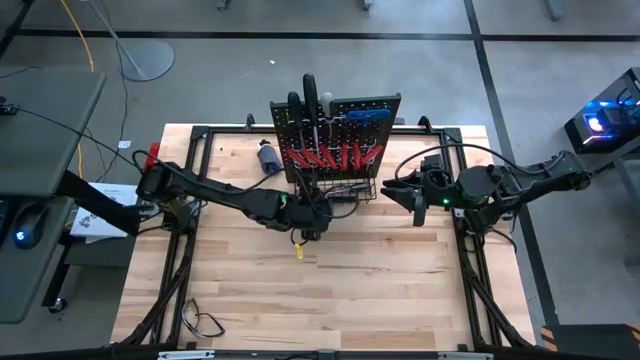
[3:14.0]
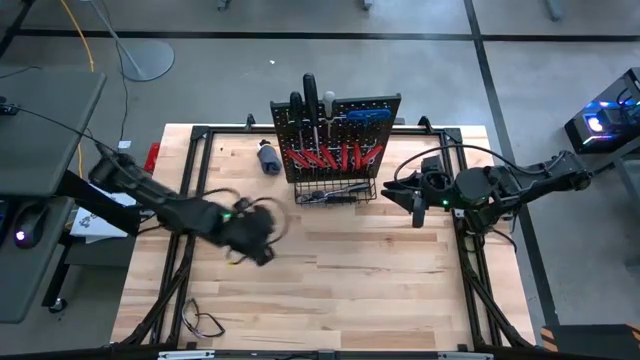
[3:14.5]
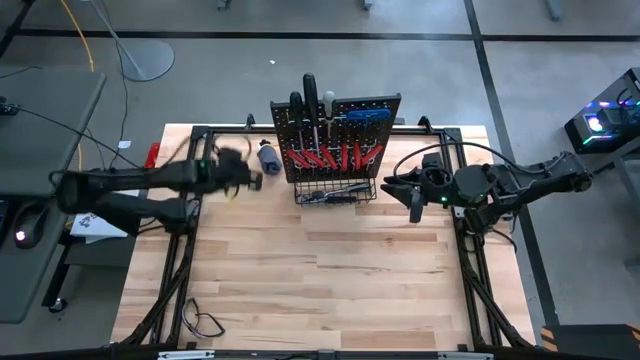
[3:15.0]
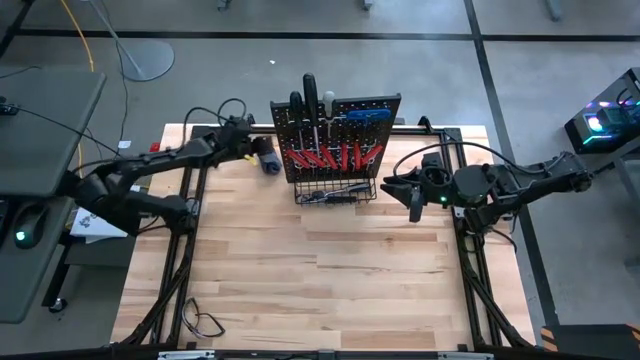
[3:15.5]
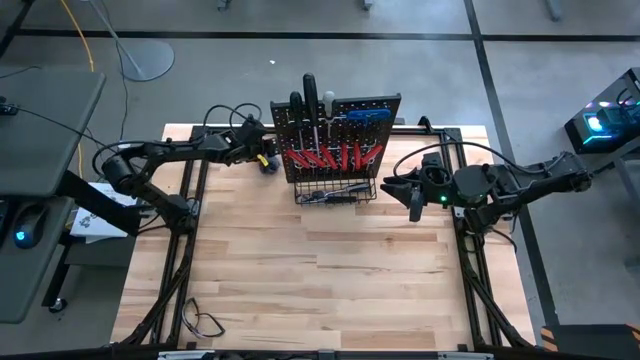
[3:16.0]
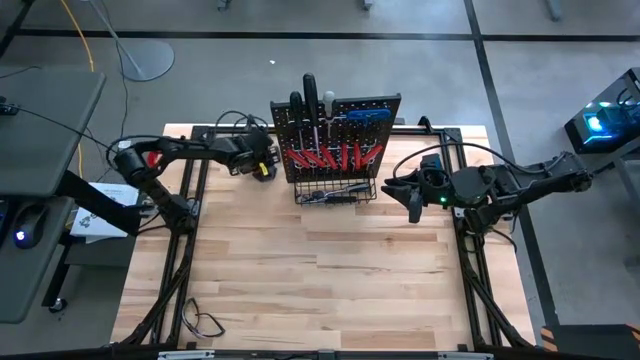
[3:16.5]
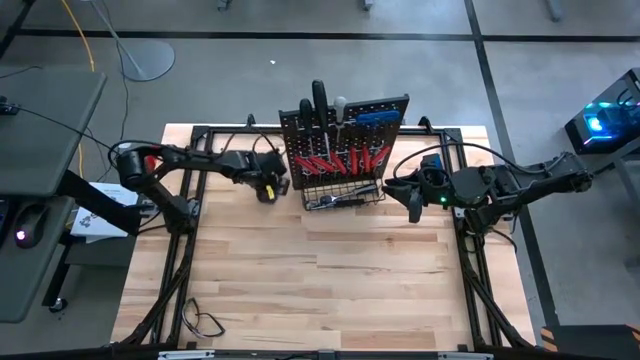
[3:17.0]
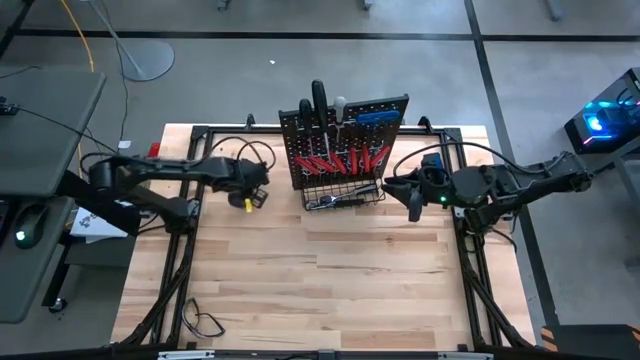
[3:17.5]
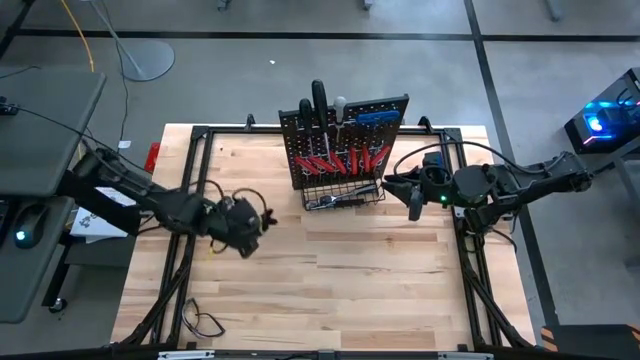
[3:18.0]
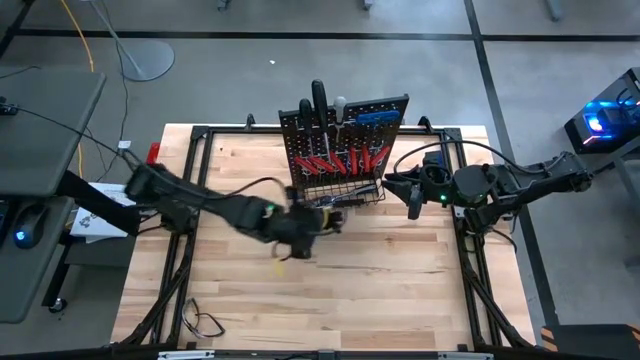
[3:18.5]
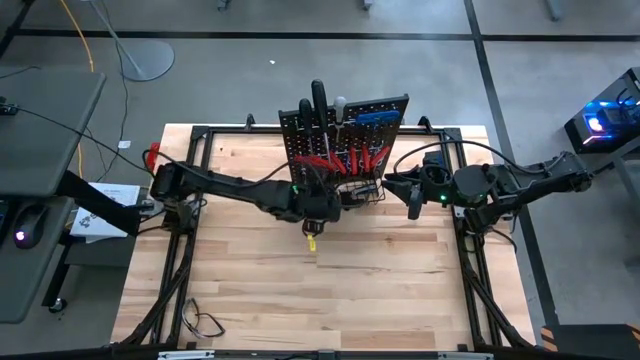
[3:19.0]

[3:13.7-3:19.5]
Task: Hang tools onto peg board
Put the gray tool loops into the wire basket on the peg board

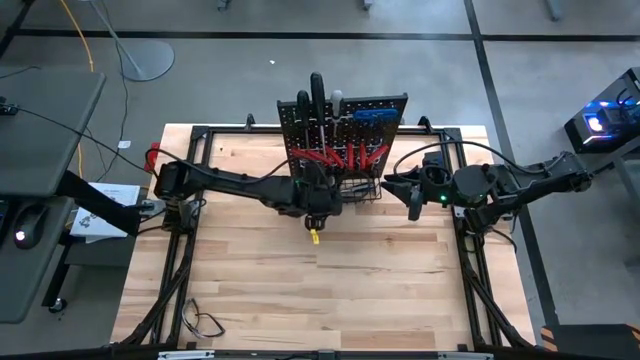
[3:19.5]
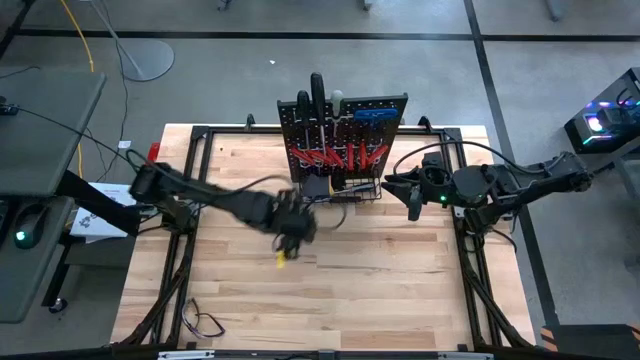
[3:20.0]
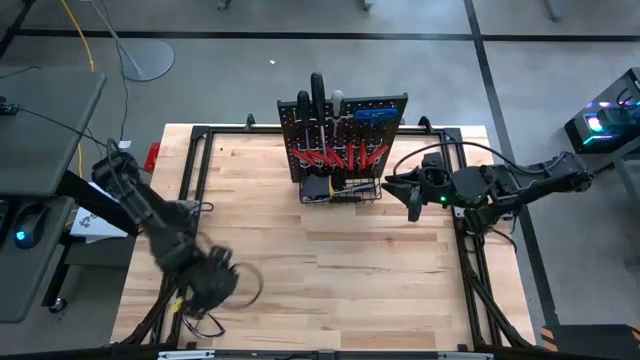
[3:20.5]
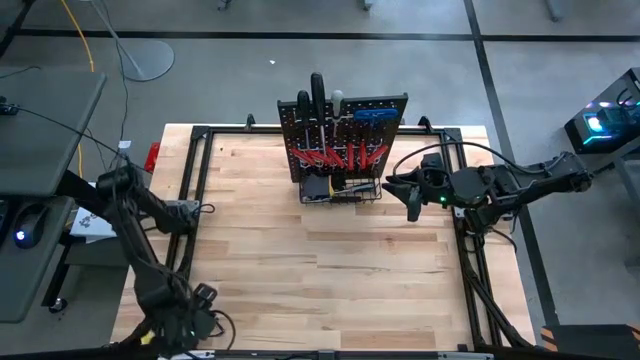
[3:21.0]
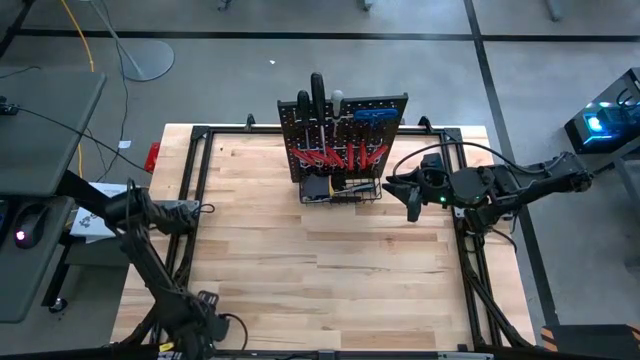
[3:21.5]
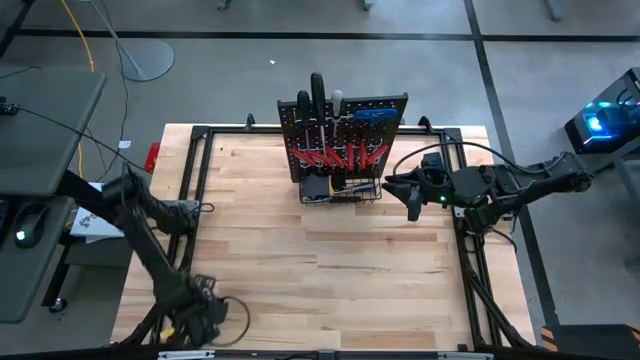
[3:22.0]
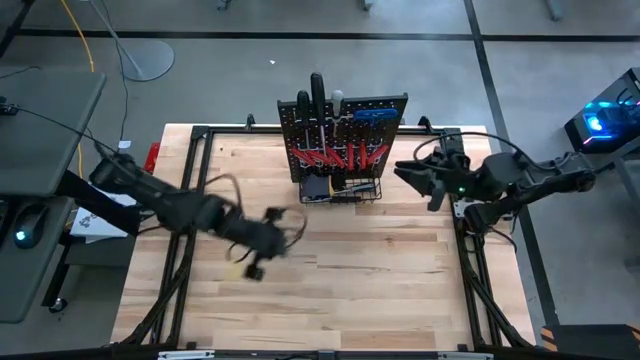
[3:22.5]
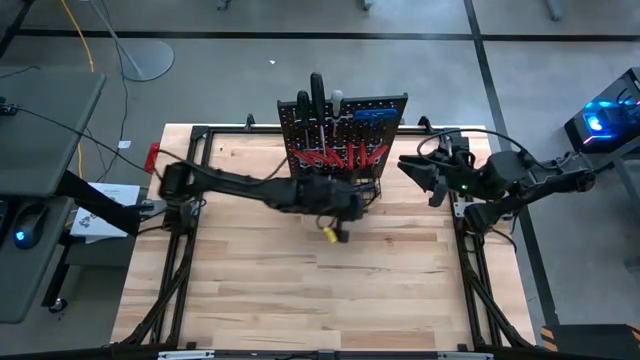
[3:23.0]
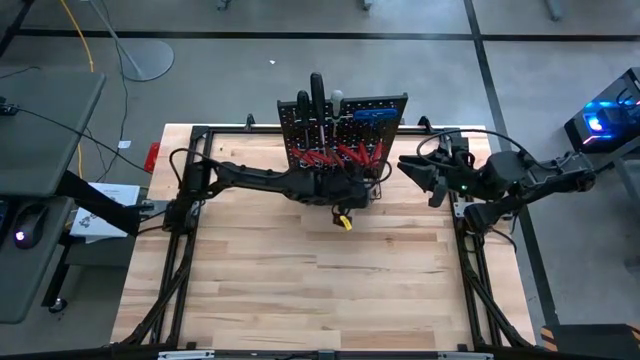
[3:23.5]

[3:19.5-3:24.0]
Put the transparent safety glass into the wire basket on the peg board

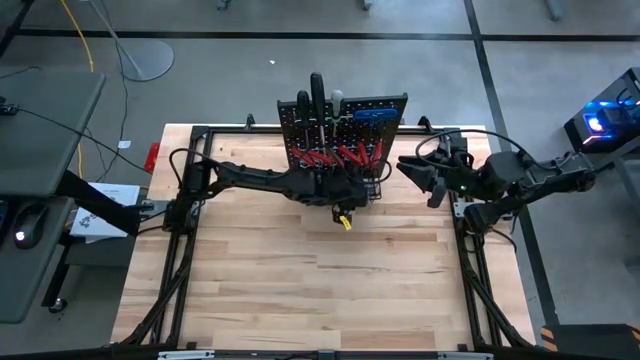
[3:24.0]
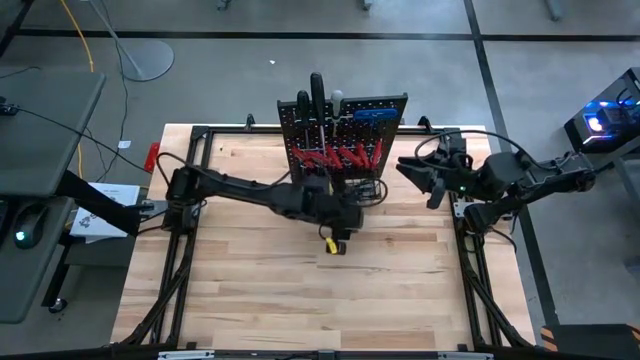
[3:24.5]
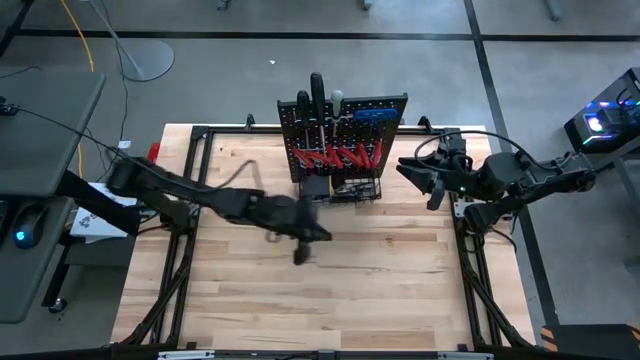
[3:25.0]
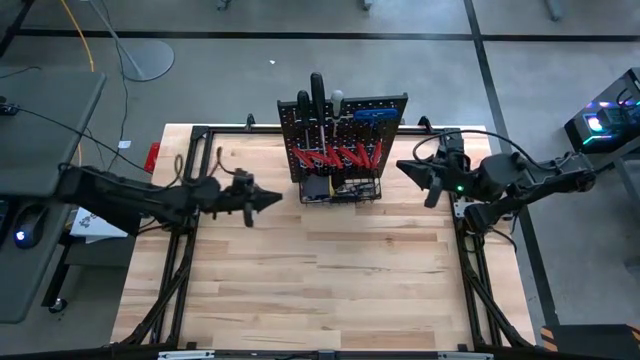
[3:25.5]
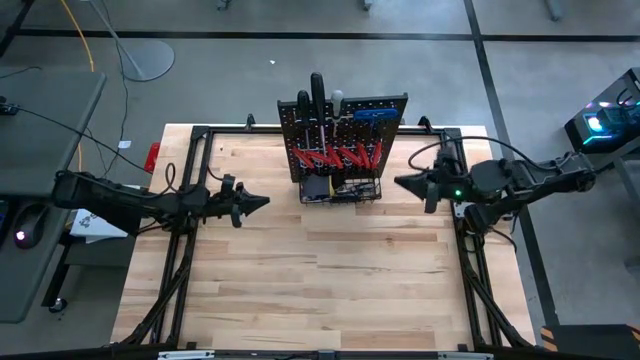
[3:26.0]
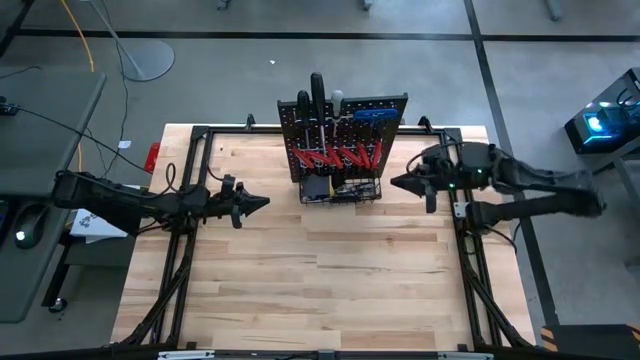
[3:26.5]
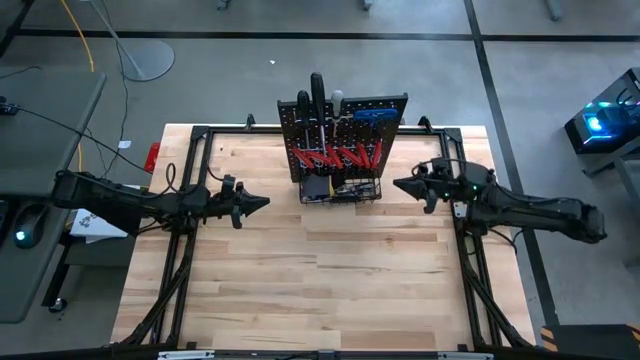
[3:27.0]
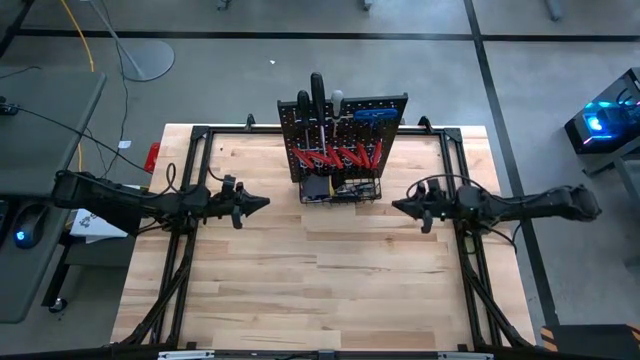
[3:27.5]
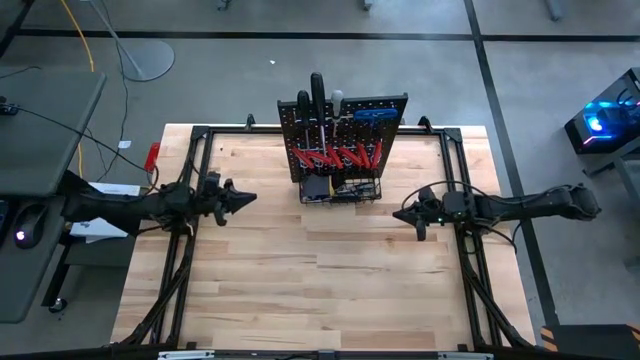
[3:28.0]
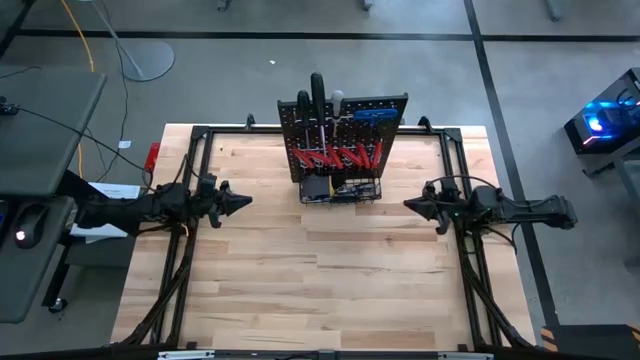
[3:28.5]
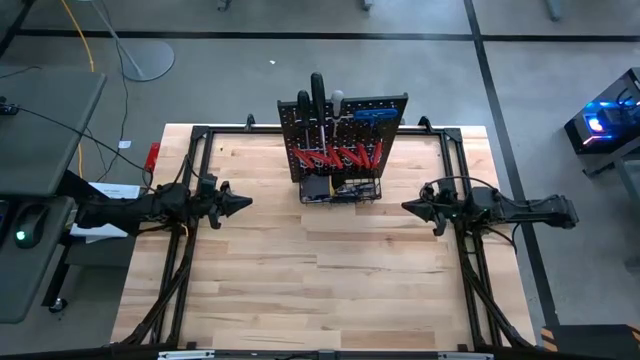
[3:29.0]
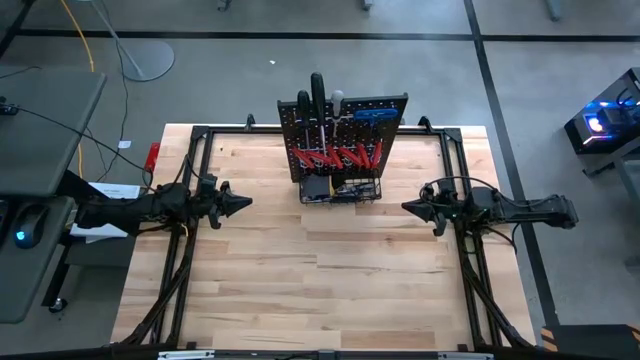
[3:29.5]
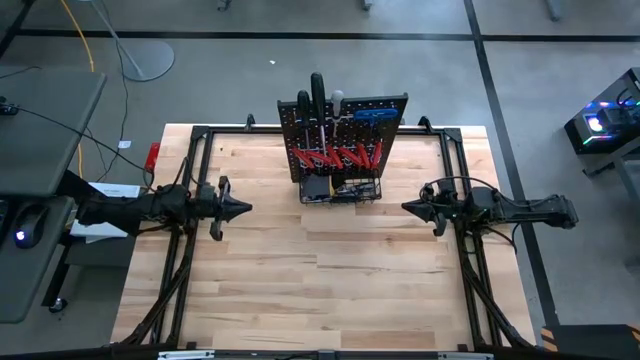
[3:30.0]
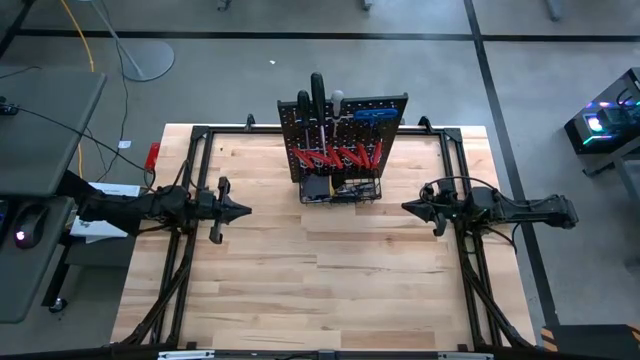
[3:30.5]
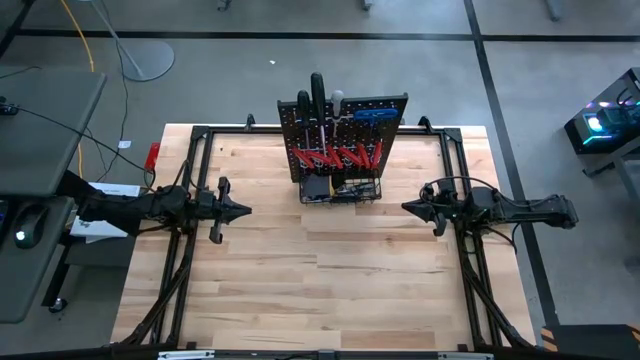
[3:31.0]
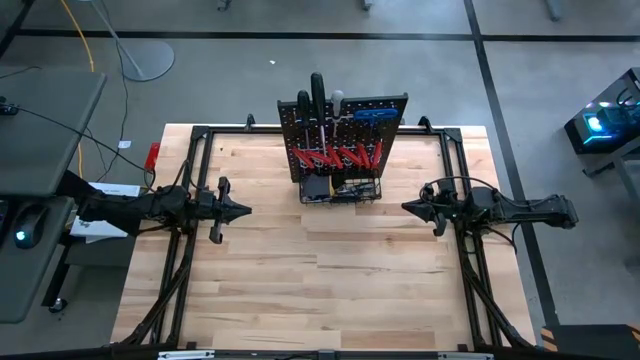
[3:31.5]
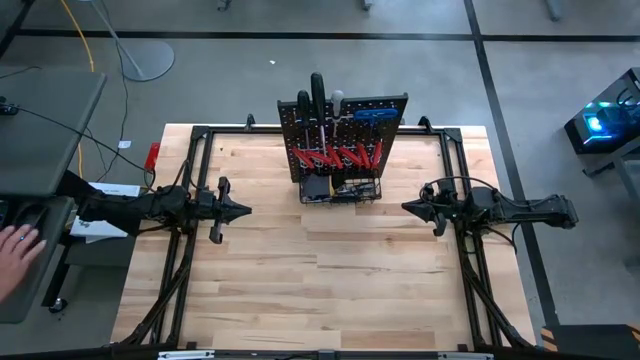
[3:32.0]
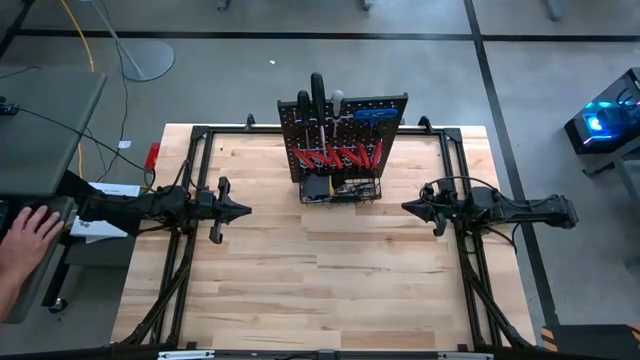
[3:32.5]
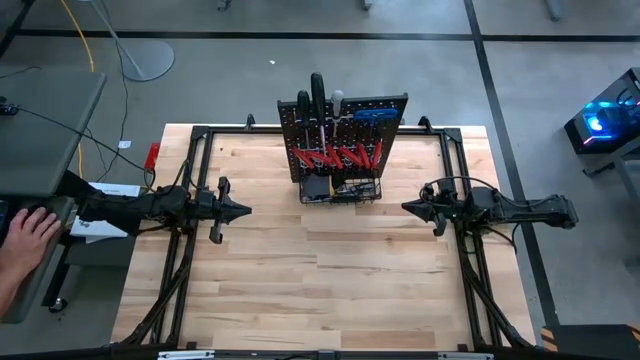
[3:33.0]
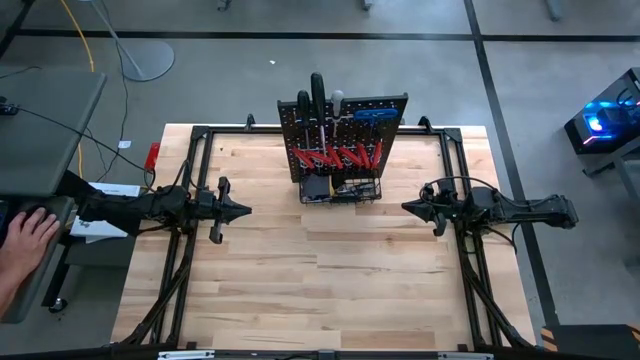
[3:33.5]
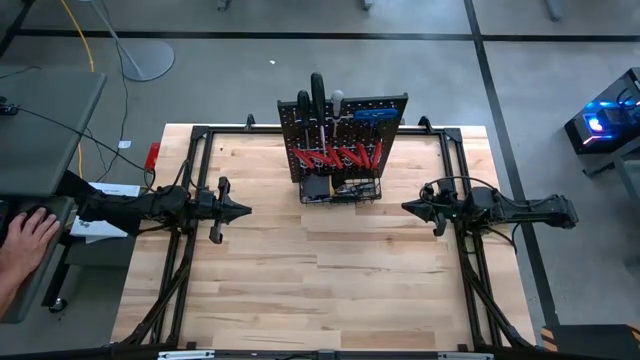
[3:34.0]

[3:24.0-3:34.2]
Return to Home Position
